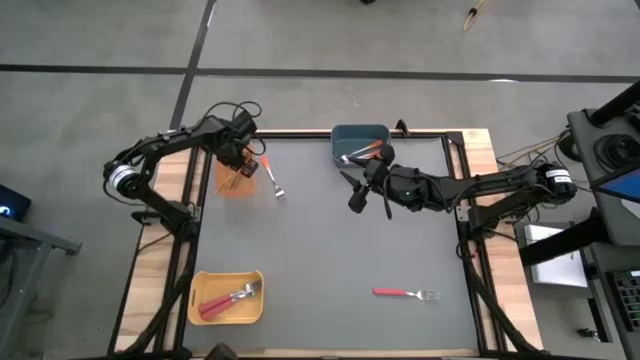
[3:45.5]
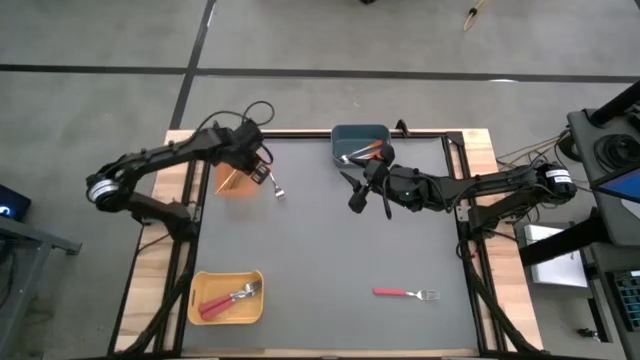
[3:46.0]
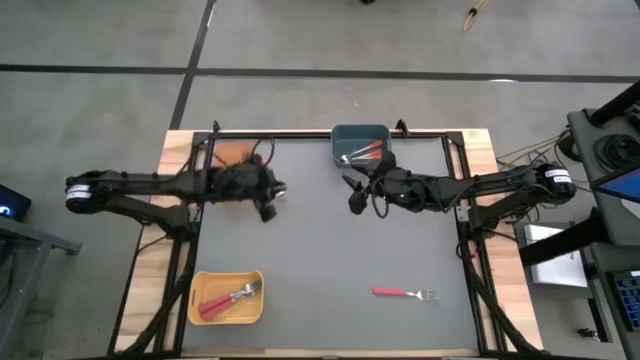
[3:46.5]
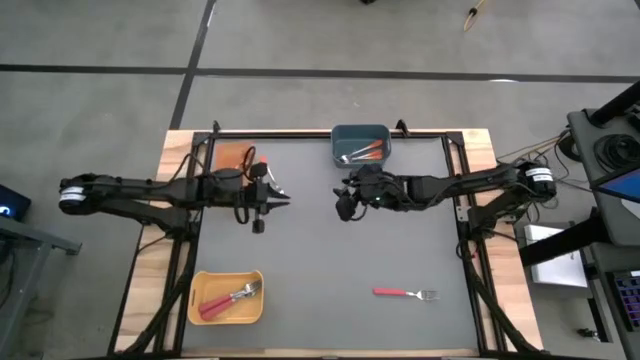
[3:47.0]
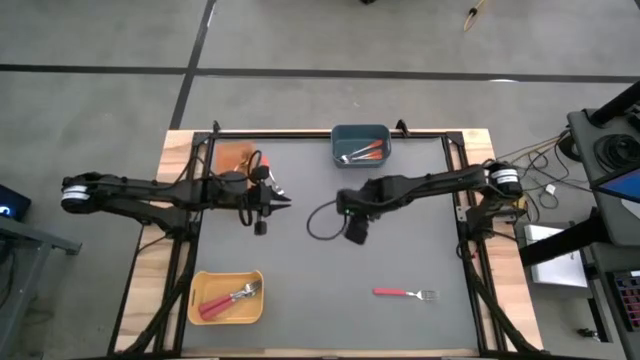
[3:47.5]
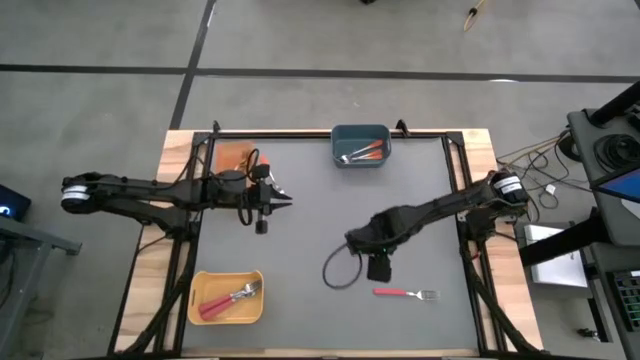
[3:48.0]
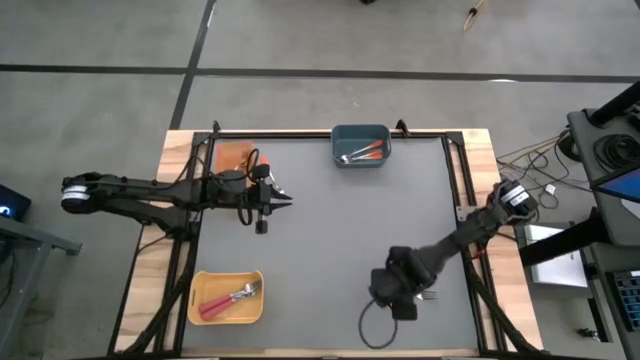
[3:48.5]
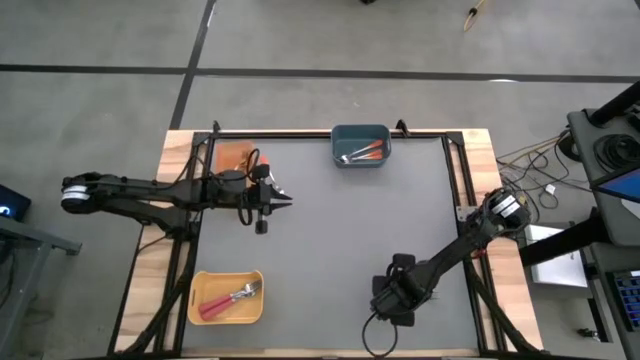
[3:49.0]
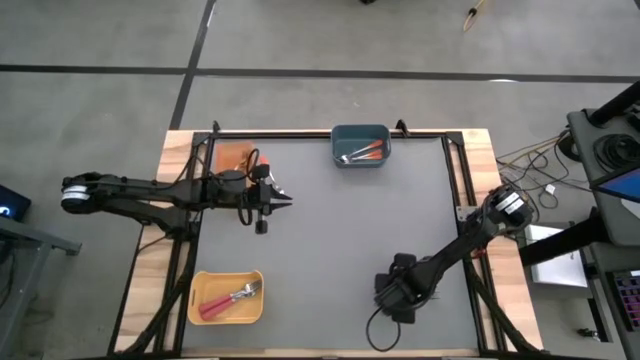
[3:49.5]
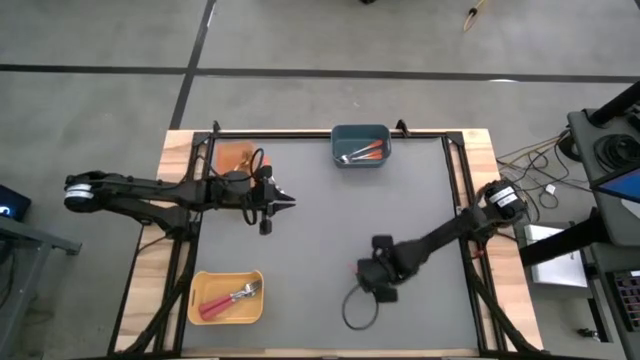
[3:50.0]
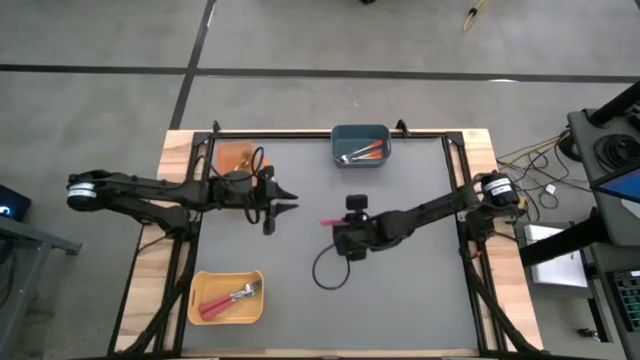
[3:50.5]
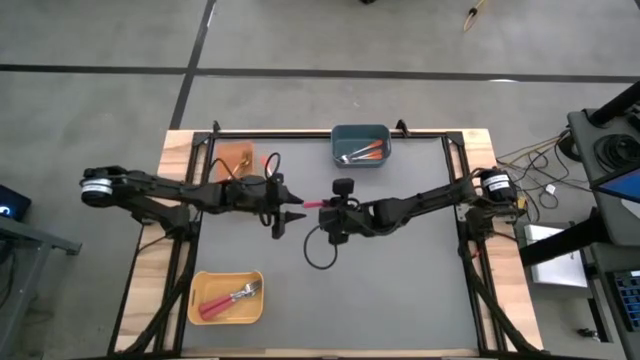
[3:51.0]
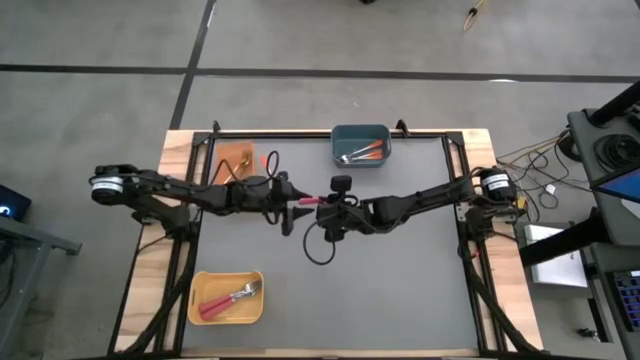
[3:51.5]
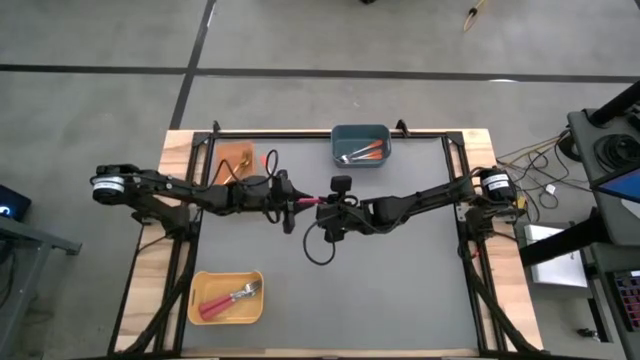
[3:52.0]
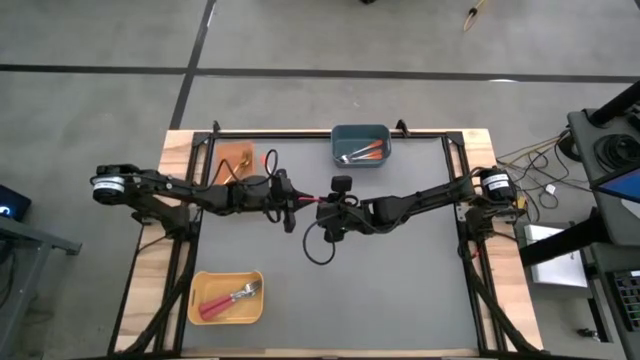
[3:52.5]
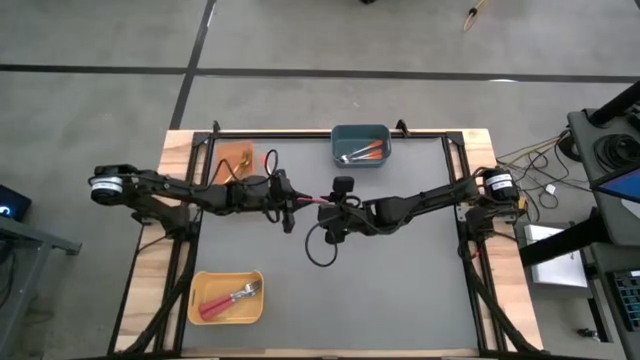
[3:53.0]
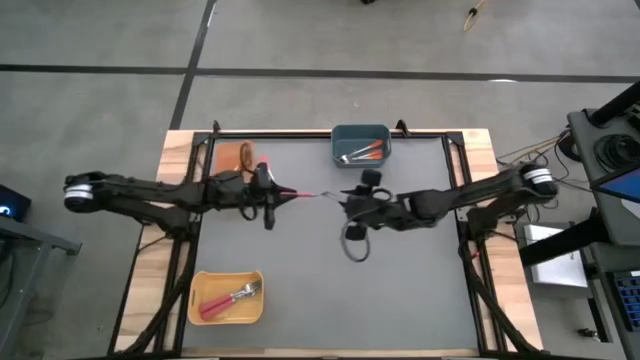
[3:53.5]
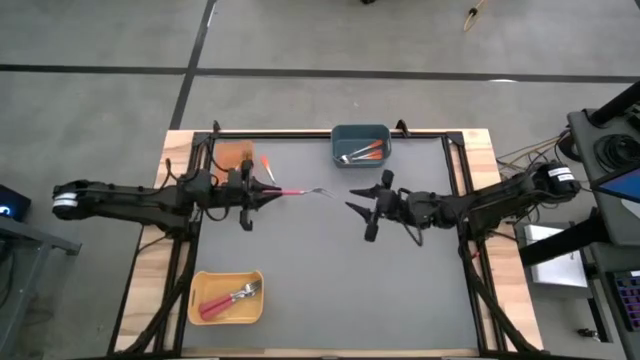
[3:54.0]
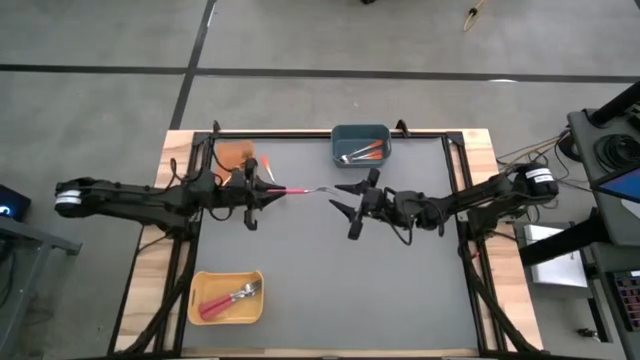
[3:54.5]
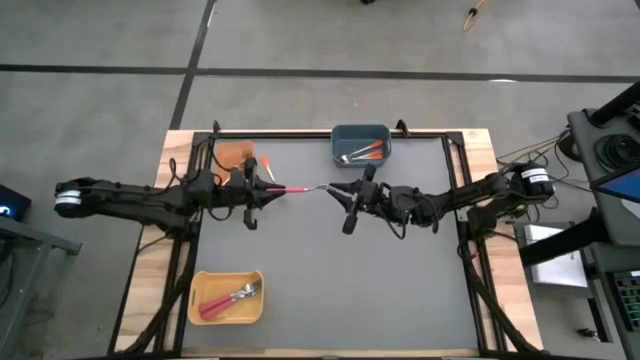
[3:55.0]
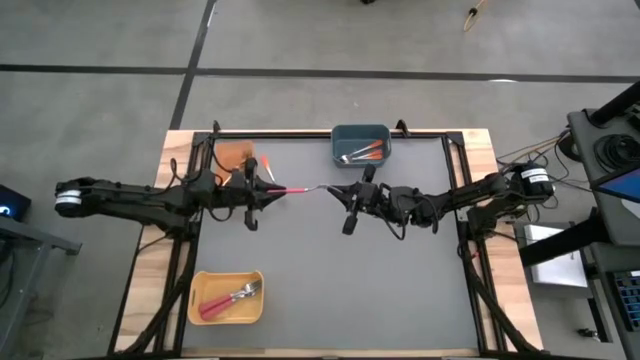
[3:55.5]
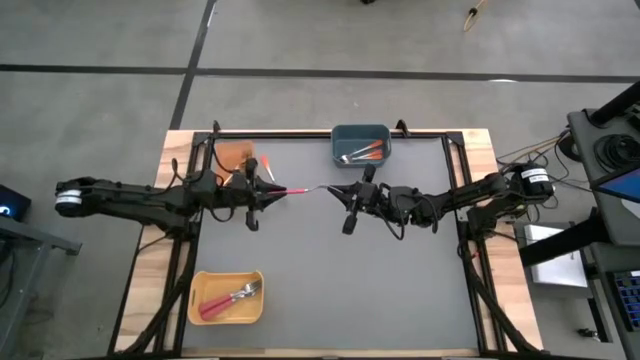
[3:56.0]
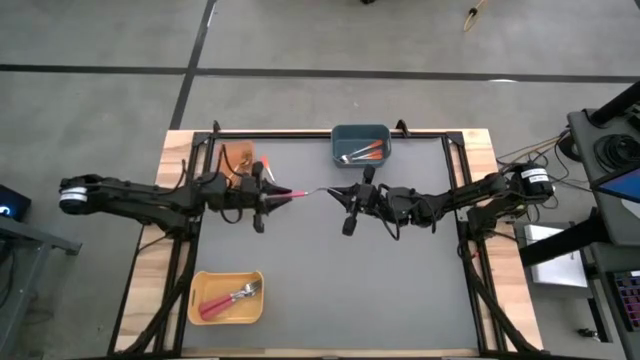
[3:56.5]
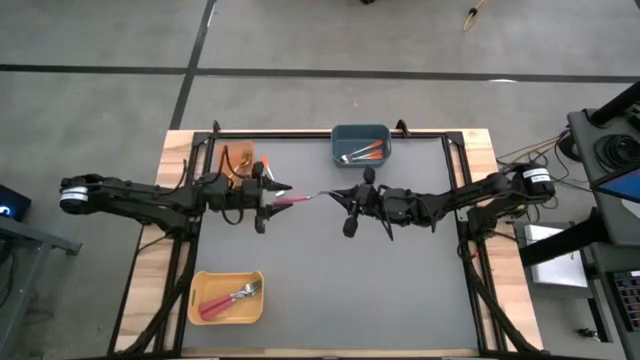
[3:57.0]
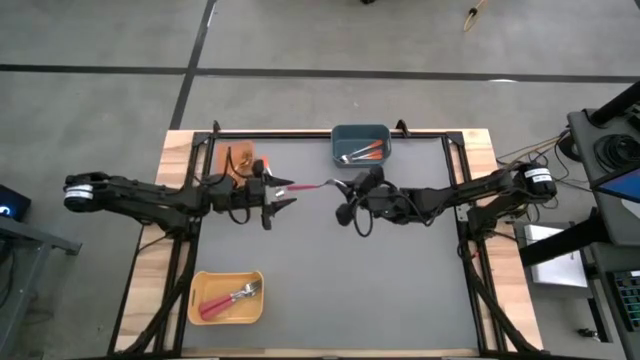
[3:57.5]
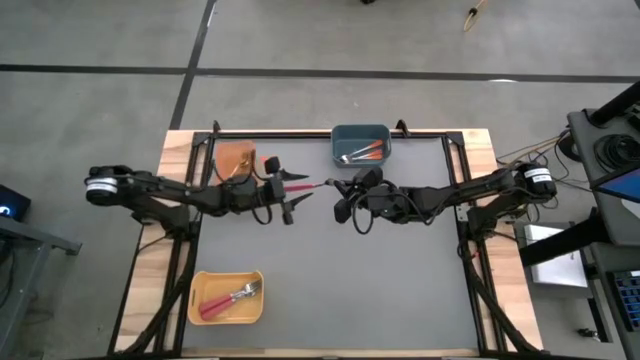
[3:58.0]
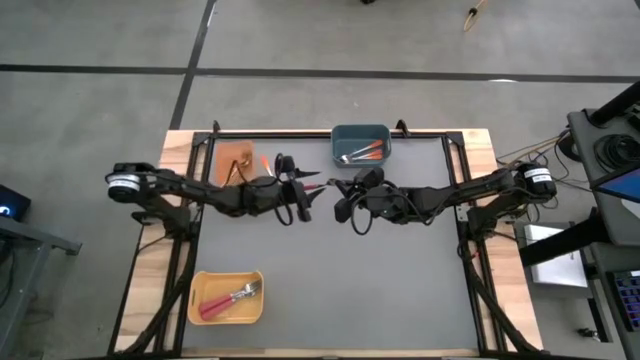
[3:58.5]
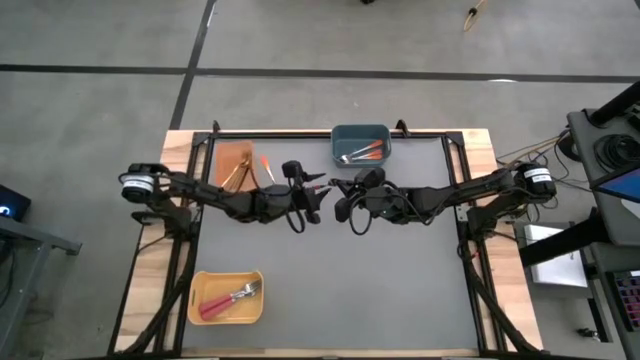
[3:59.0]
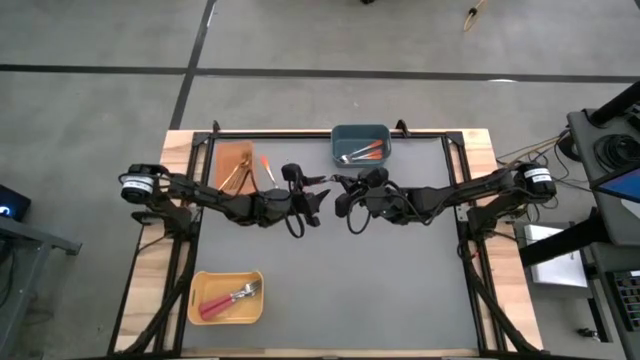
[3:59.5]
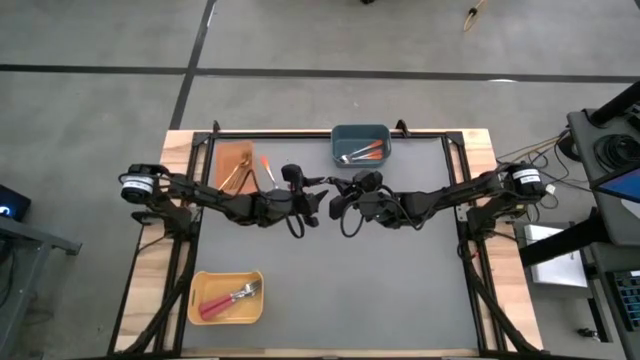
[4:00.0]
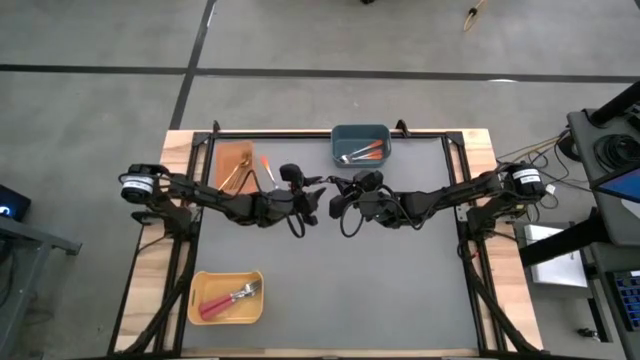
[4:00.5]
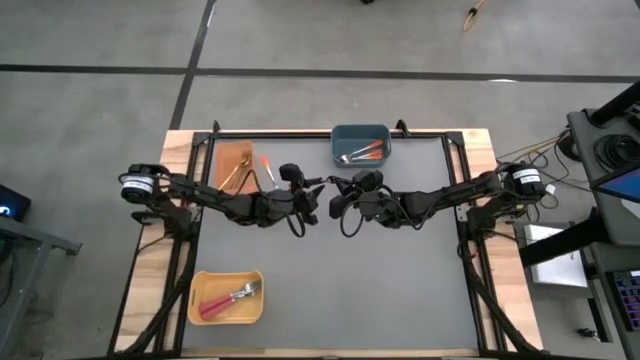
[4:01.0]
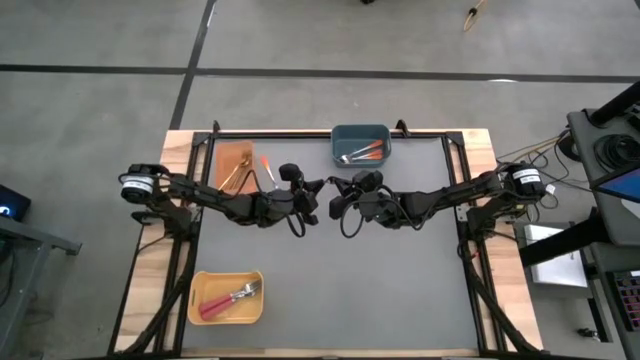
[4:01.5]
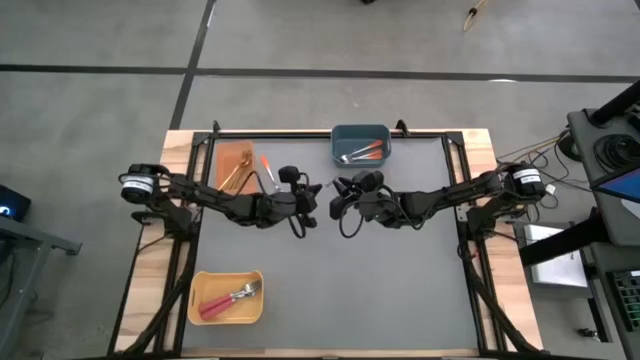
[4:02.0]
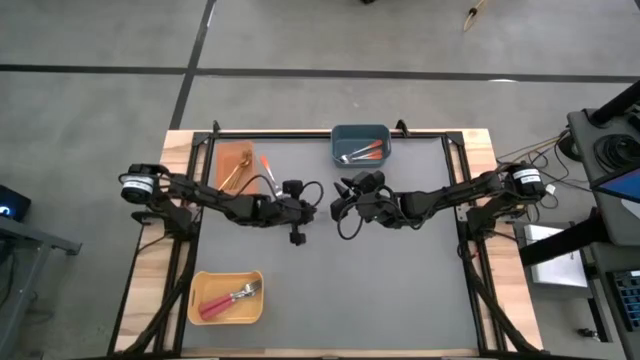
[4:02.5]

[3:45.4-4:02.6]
Task: Sort silverware by color (type)
Put the pink fork into the yellow bin

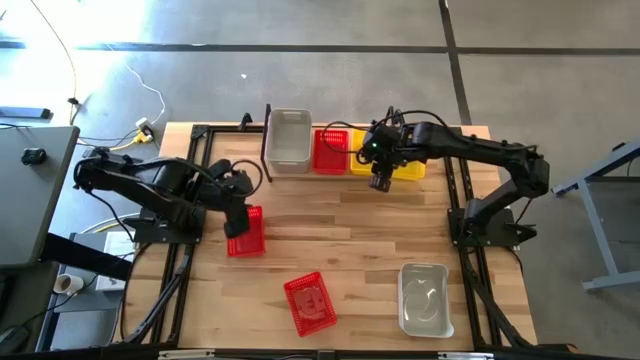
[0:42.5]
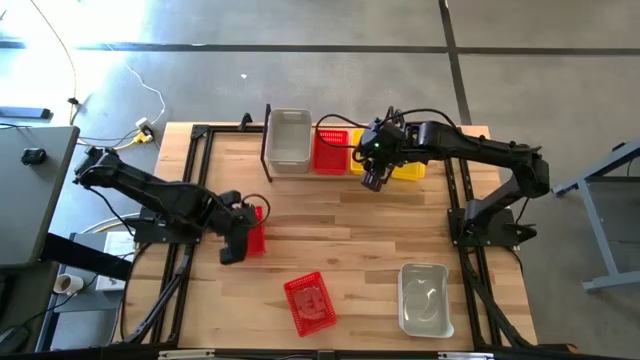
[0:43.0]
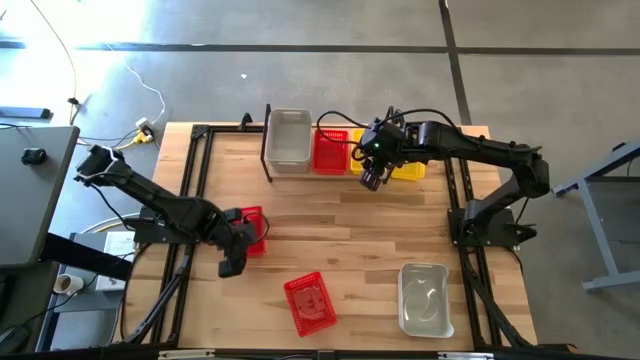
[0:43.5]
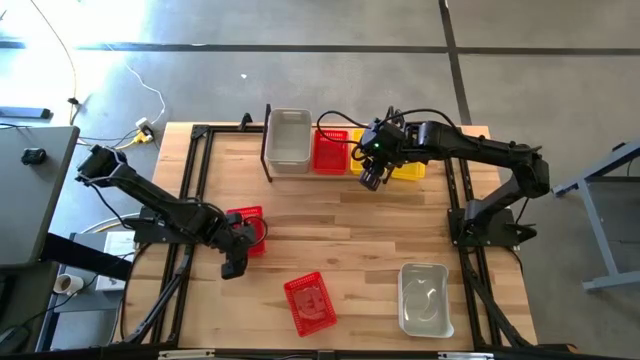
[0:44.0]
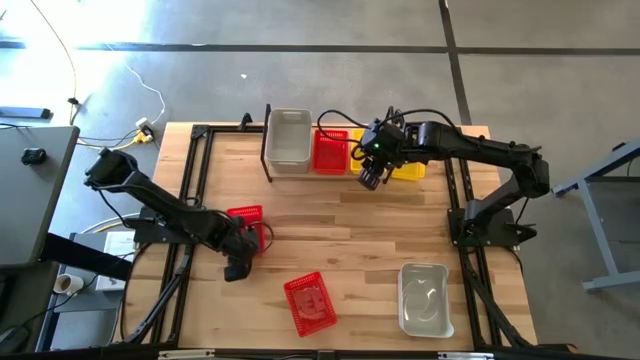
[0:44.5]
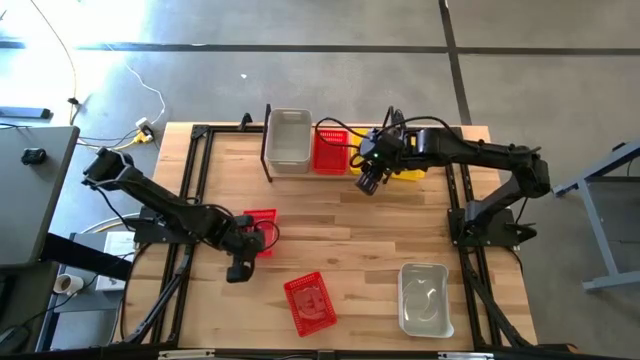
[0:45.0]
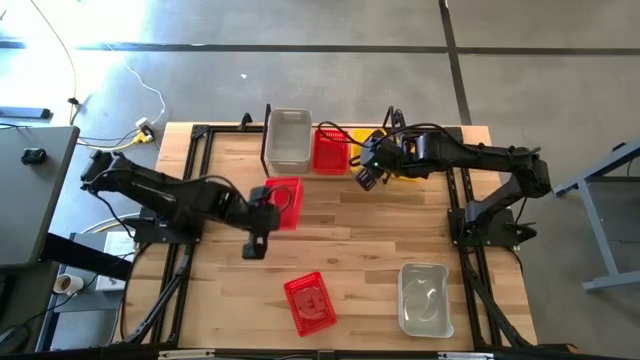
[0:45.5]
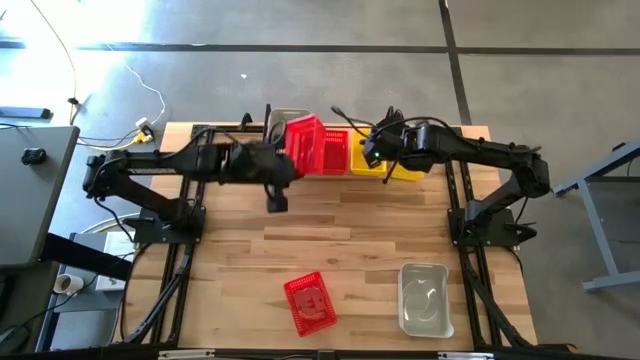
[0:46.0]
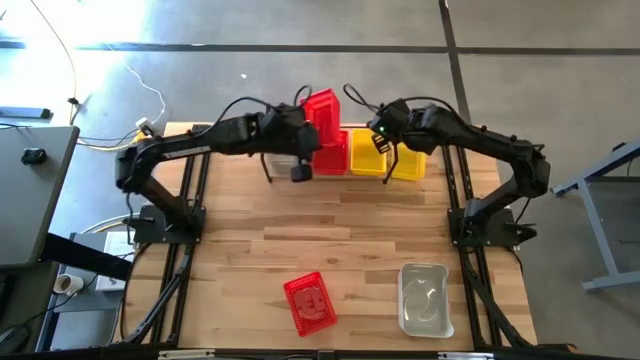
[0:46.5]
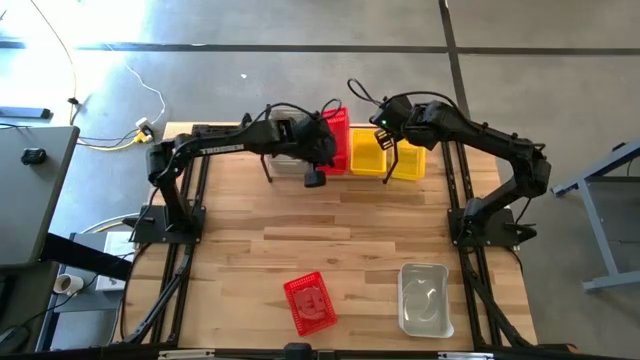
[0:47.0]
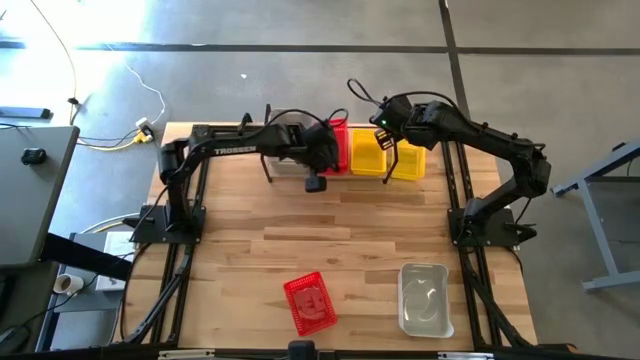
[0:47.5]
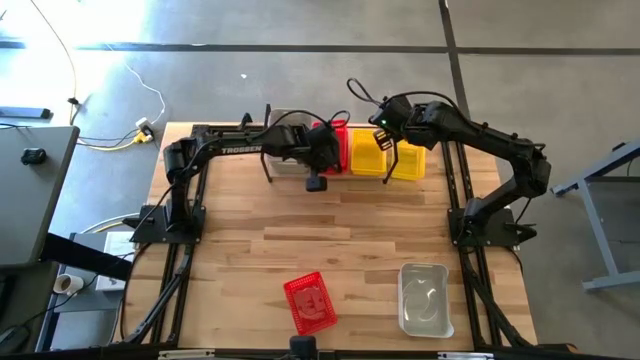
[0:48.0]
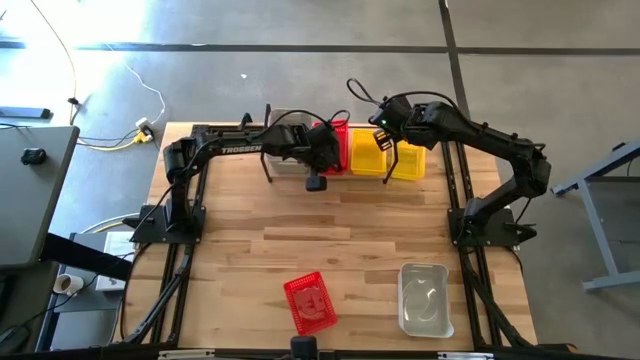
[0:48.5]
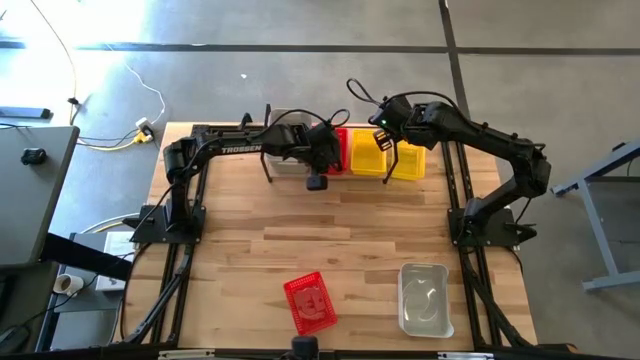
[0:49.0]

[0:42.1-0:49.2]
Task: Stack baskets on shelf by color
Stack the left red bin on top of the red bin
